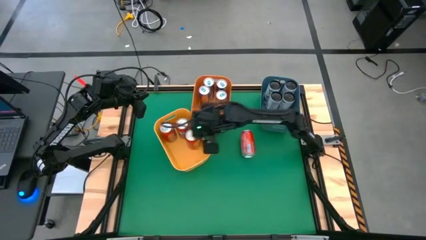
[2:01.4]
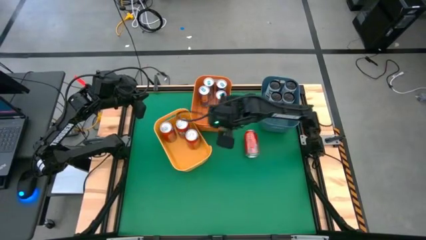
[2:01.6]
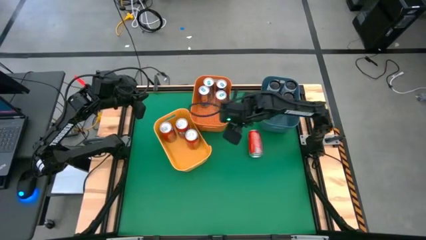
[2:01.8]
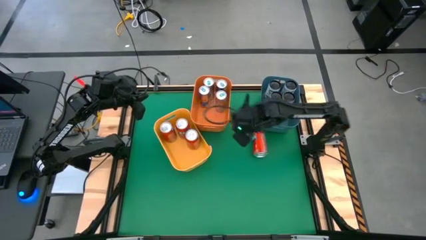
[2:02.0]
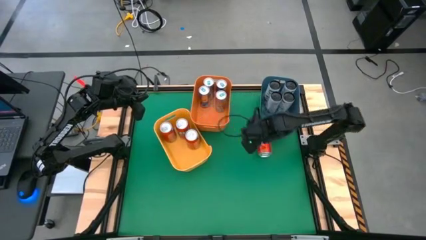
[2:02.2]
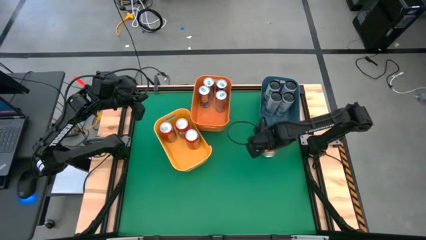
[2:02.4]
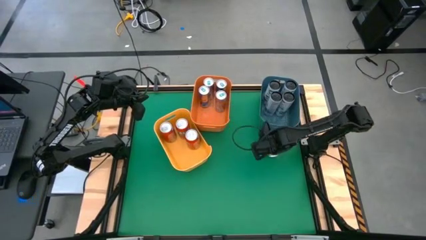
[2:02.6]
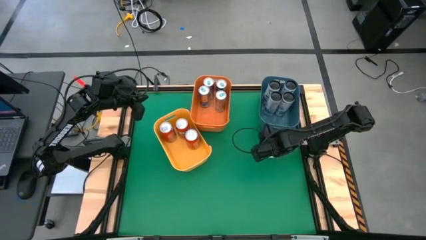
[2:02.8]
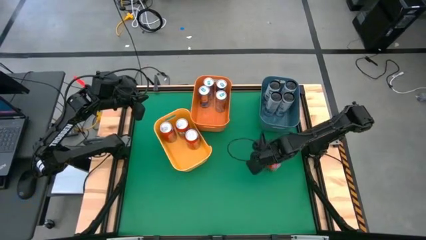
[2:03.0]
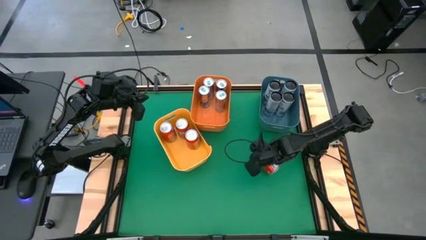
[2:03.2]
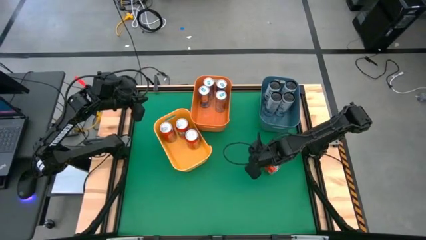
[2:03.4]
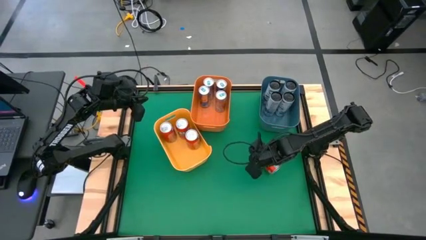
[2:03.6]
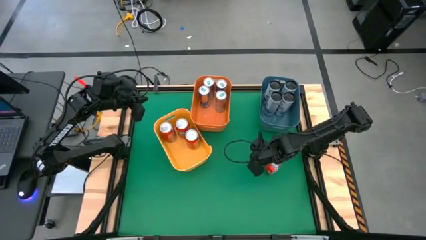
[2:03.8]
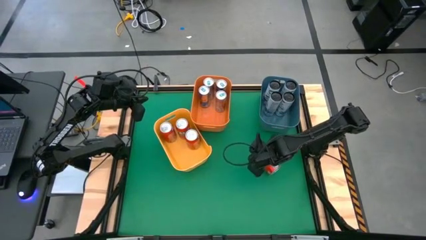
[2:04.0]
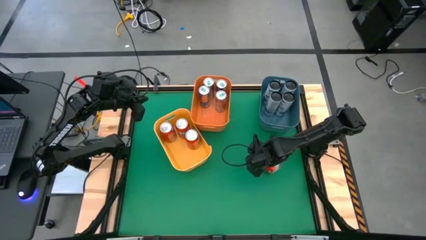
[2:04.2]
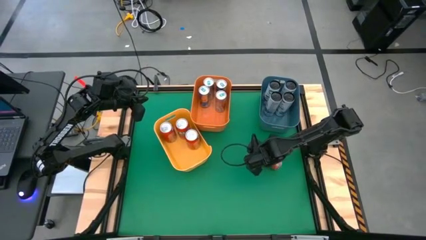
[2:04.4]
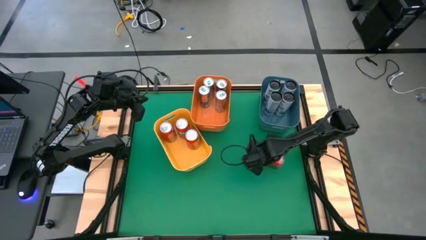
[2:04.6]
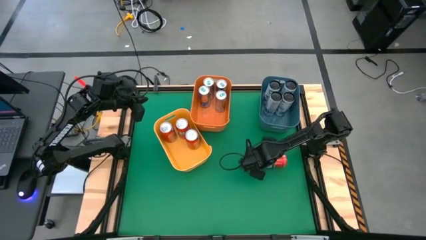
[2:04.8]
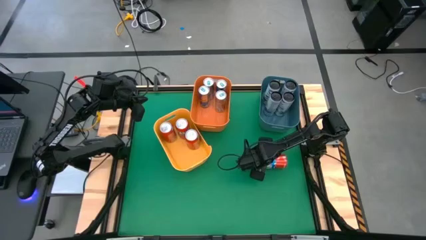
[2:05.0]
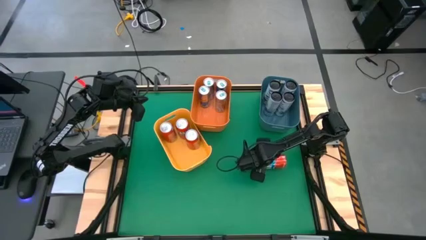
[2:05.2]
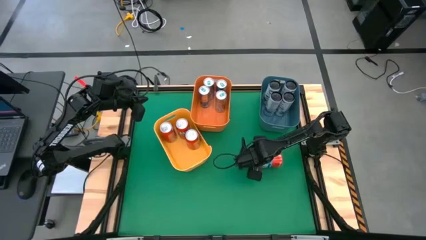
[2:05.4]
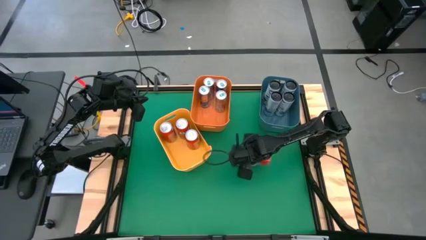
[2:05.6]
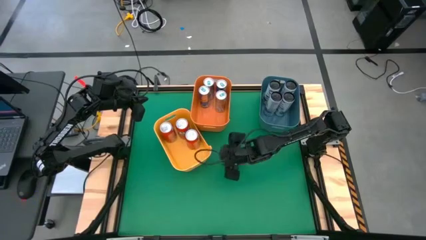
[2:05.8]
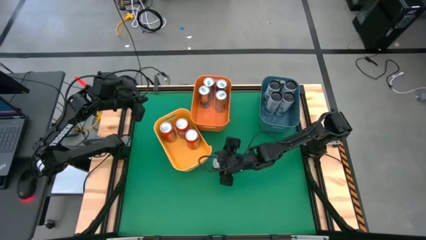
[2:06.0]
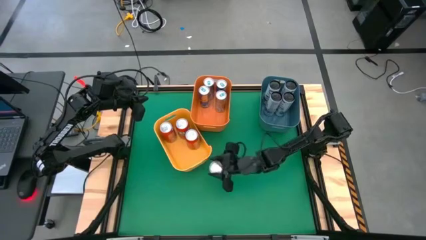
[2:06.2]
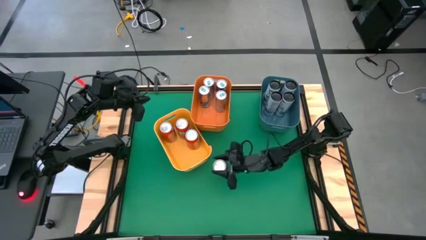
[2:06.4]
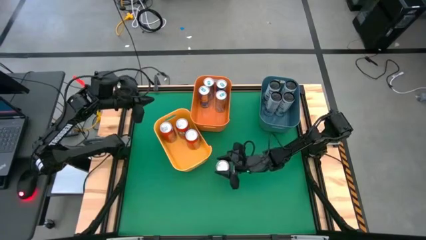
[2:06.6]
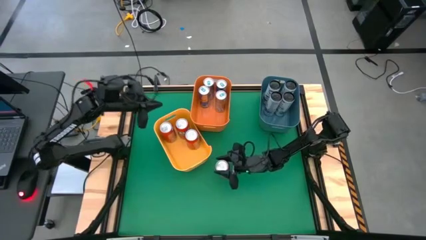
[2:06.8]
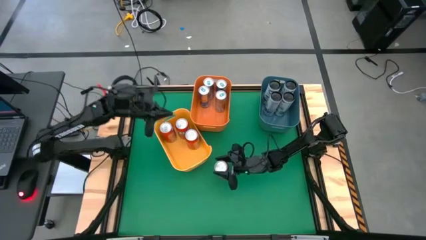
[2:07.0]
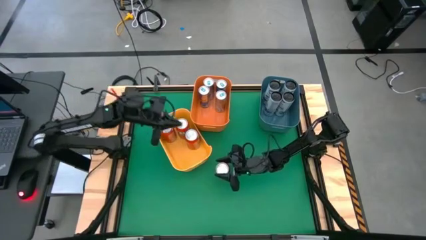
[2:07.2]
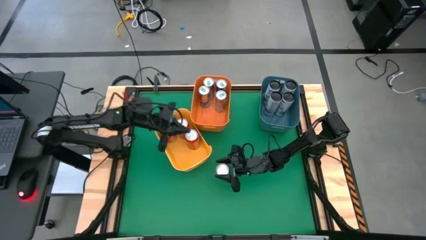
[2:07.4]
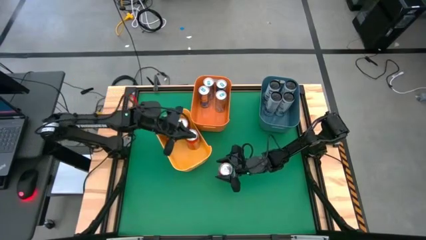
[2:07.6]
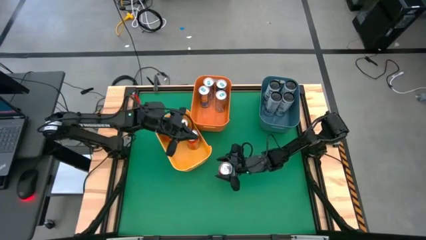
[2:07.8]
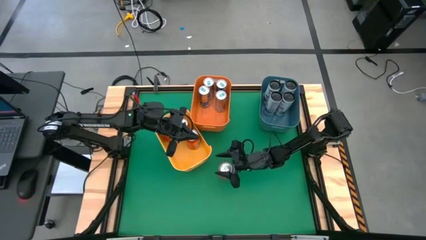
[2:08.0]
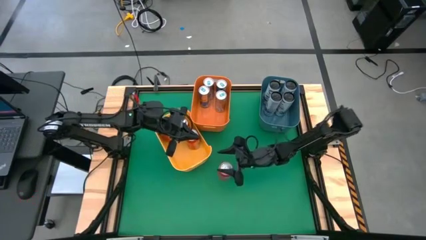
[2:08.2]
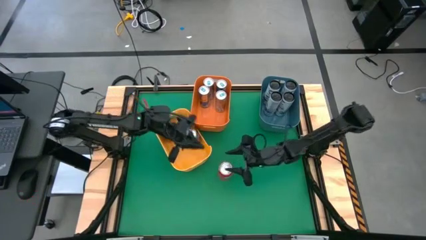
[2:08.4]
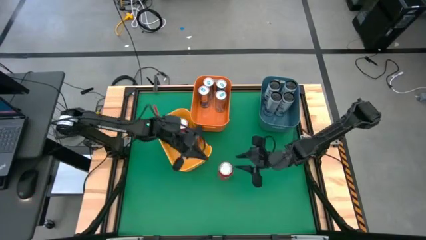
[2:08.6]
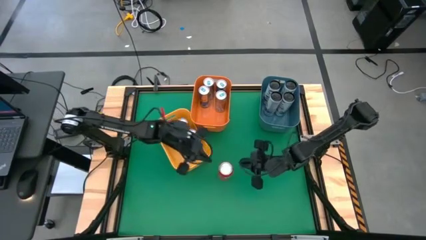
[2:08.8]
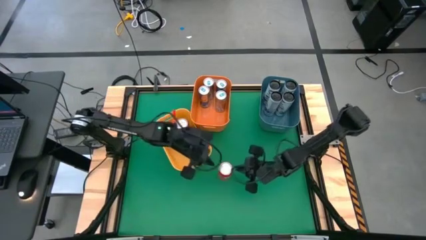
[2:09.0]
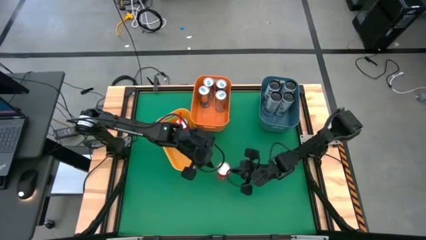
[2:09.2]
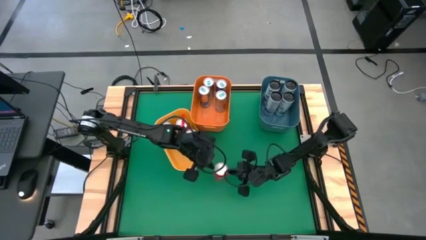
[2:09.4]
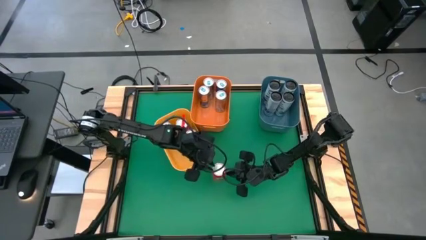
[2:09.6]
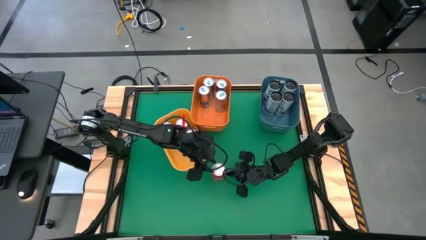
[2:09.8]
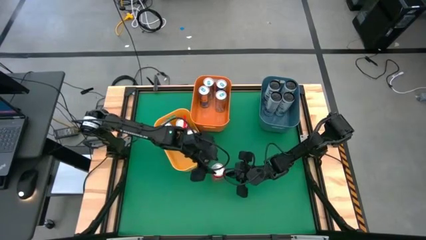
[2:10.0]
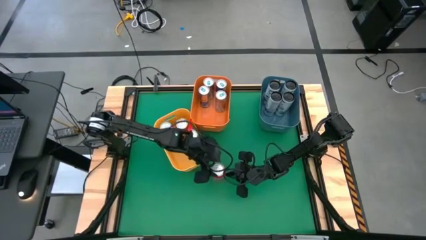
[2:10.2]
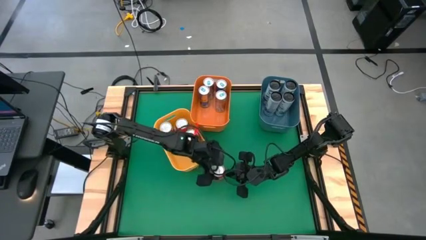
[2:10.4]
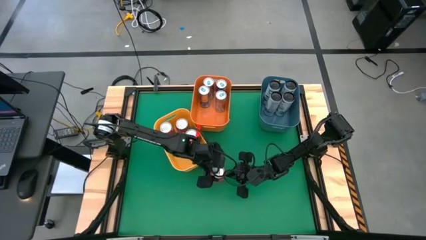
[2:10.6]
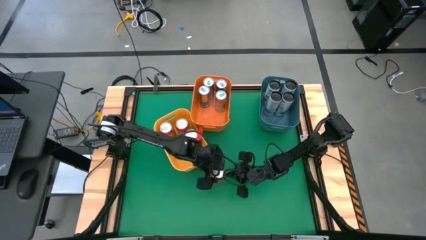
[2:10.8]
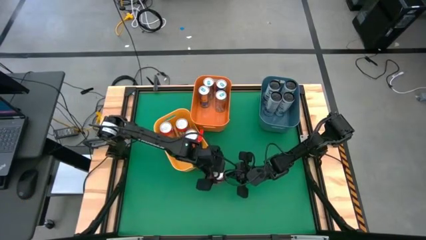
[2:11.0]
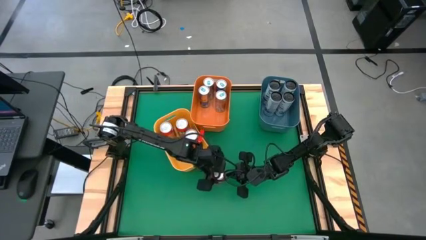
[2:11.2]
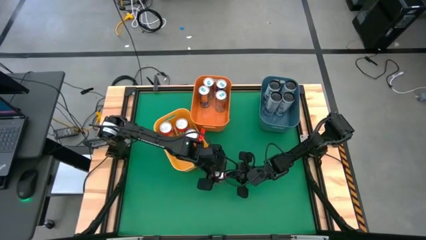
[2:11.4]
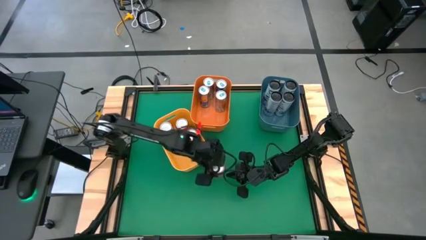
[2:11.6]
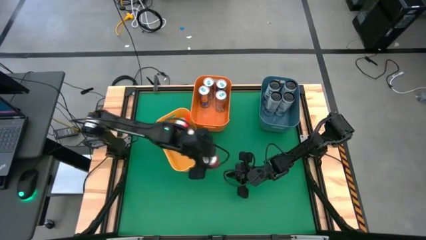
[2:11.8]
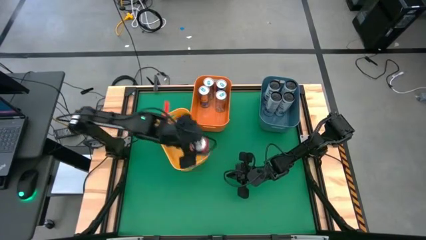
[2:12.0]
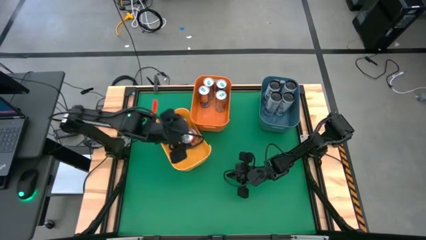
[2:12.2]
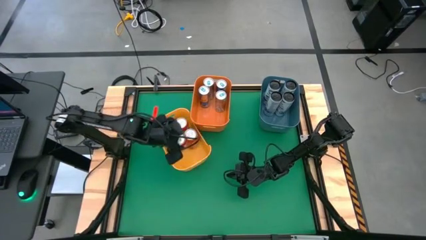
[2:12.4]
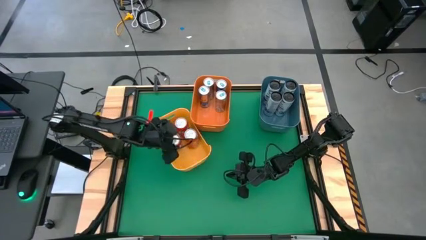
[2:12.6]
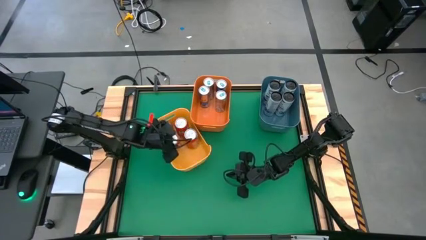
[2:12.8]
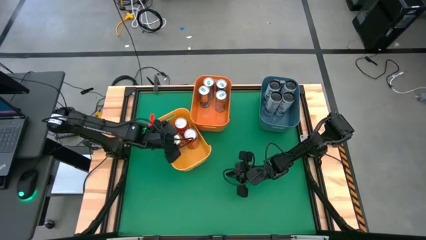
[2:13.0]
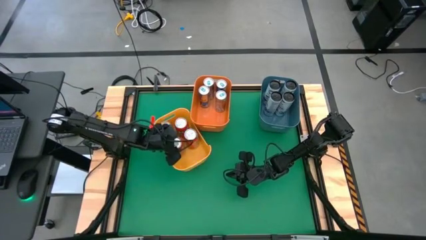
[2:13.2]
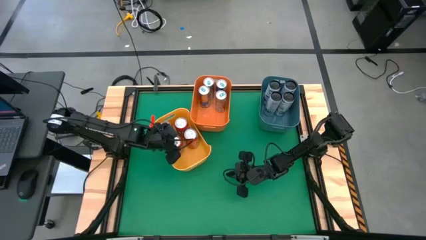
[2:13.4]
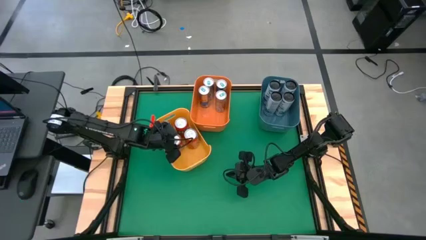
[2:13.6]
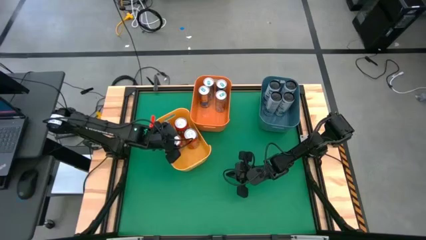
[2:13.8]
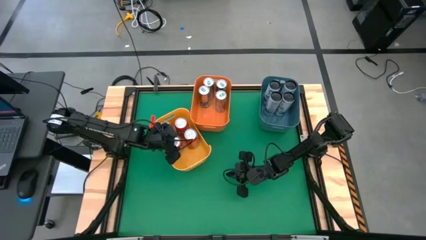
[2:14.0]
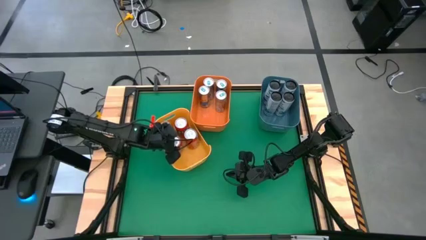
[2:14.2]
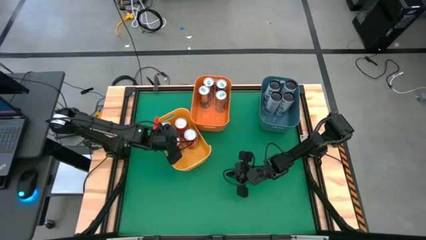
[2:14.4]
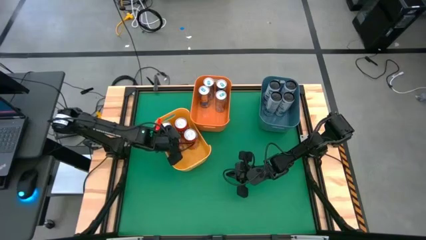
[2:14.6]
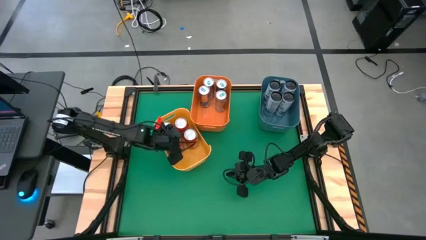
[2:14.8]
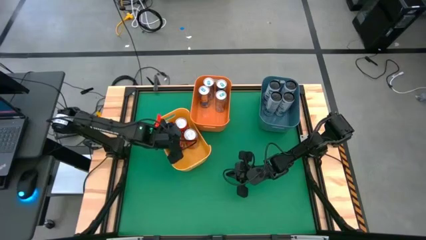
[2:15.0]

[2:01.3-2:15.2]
Task: Sort soda cans
Put the orange soda can into the yellow bin
